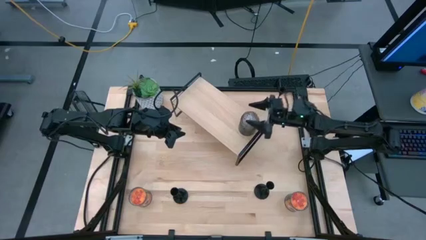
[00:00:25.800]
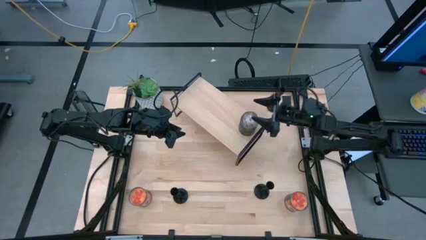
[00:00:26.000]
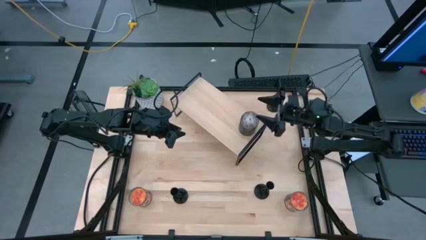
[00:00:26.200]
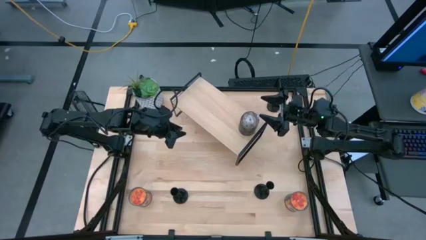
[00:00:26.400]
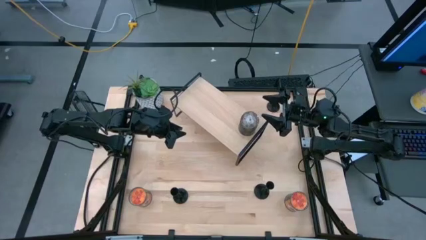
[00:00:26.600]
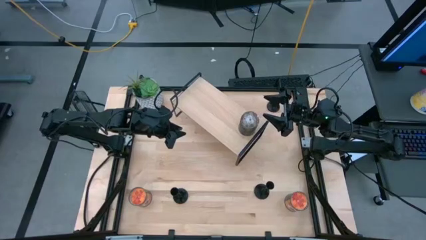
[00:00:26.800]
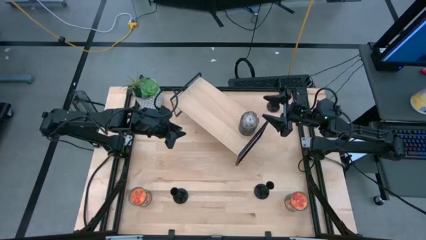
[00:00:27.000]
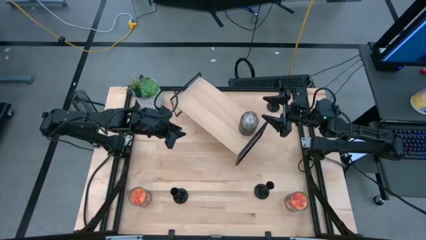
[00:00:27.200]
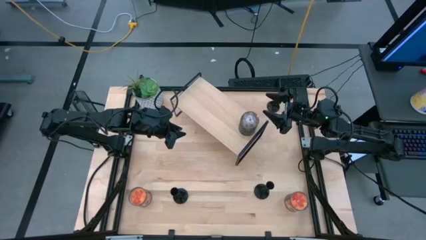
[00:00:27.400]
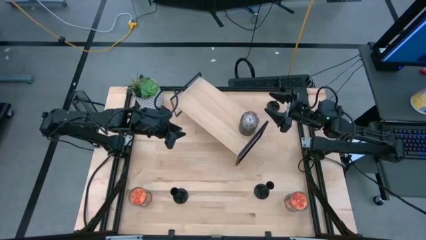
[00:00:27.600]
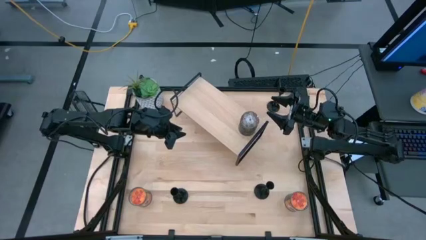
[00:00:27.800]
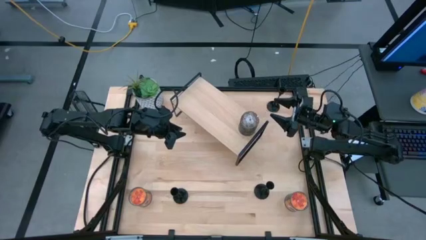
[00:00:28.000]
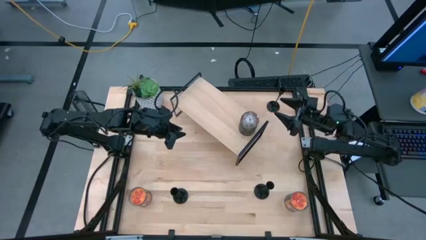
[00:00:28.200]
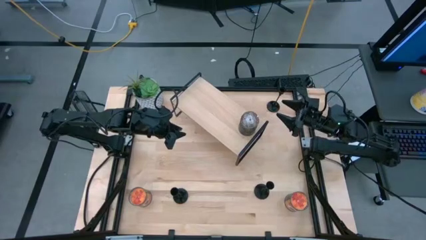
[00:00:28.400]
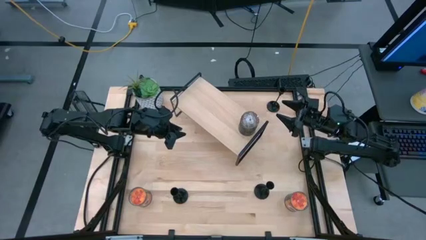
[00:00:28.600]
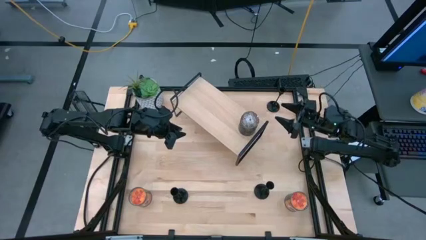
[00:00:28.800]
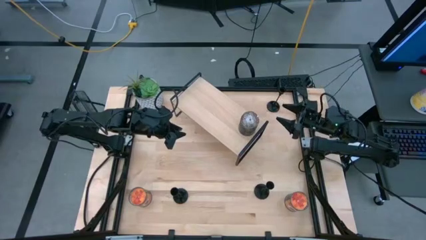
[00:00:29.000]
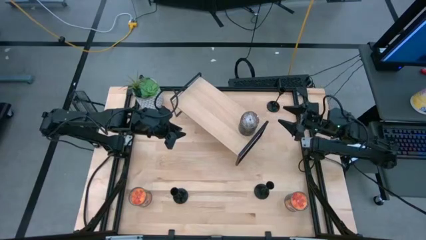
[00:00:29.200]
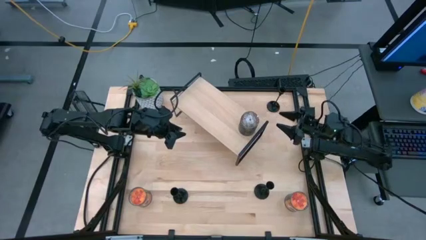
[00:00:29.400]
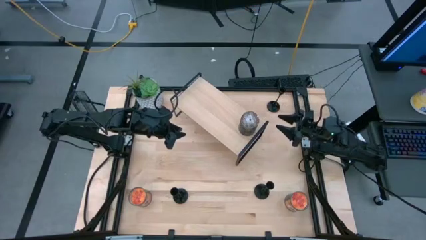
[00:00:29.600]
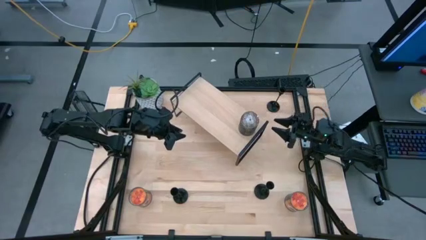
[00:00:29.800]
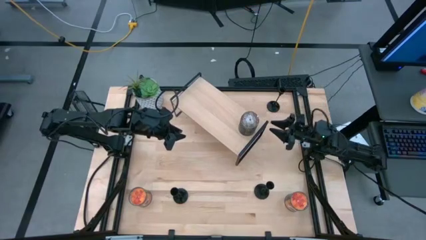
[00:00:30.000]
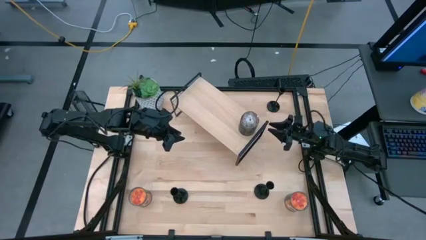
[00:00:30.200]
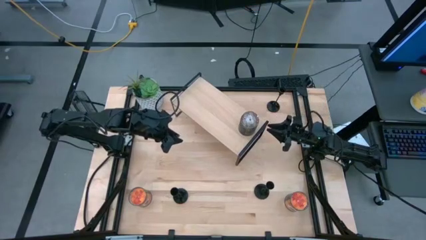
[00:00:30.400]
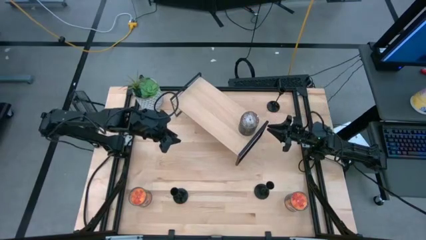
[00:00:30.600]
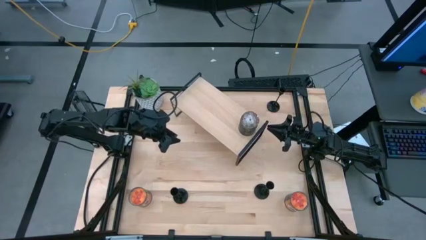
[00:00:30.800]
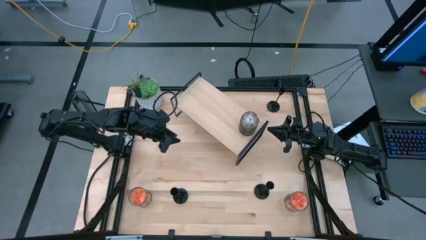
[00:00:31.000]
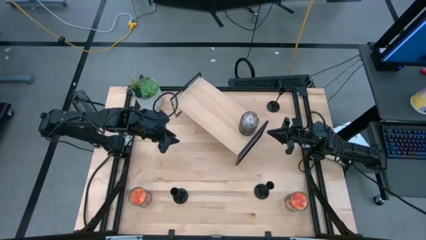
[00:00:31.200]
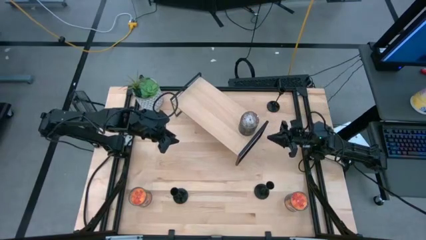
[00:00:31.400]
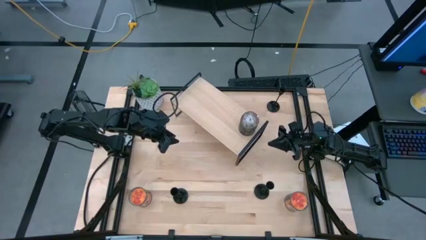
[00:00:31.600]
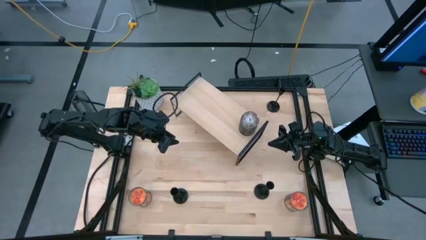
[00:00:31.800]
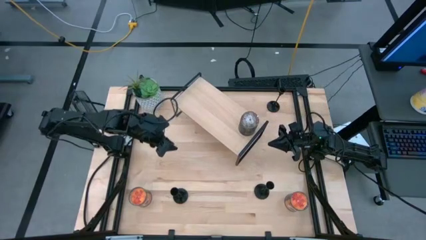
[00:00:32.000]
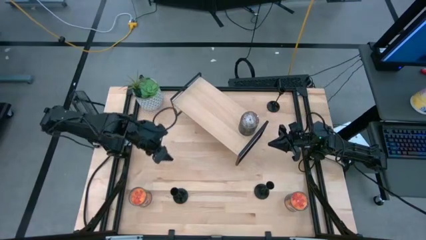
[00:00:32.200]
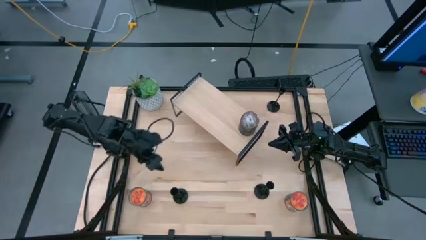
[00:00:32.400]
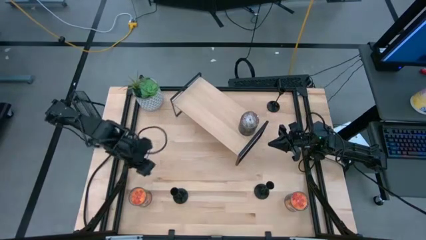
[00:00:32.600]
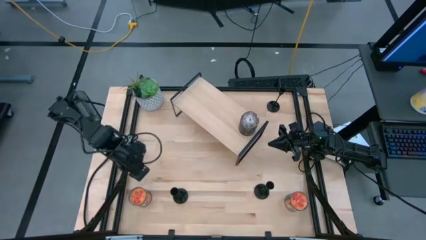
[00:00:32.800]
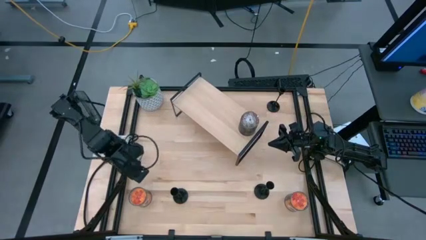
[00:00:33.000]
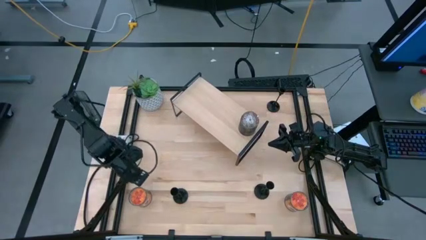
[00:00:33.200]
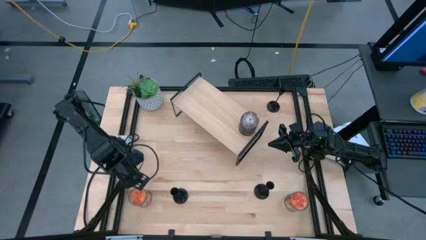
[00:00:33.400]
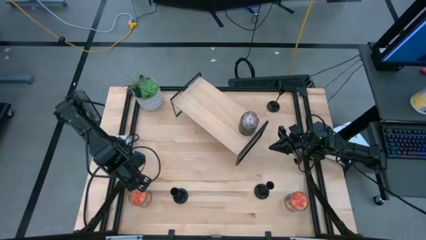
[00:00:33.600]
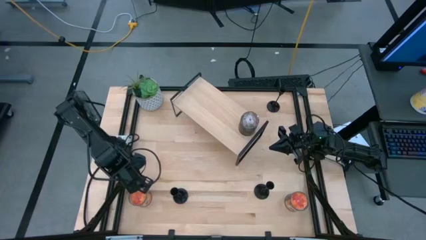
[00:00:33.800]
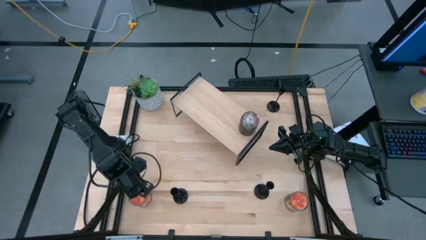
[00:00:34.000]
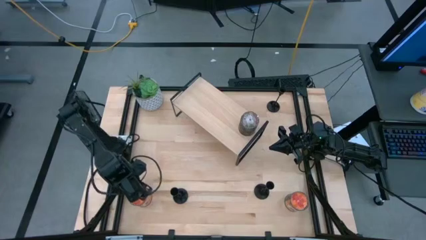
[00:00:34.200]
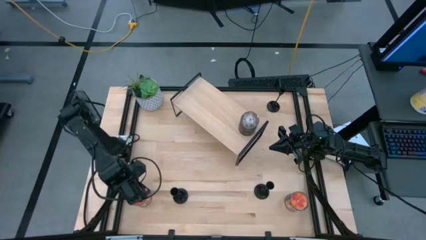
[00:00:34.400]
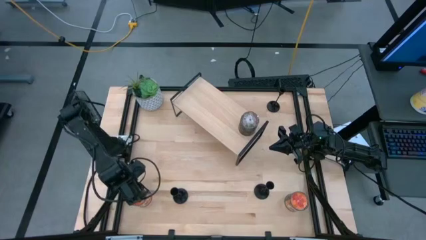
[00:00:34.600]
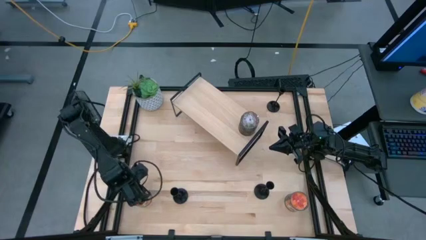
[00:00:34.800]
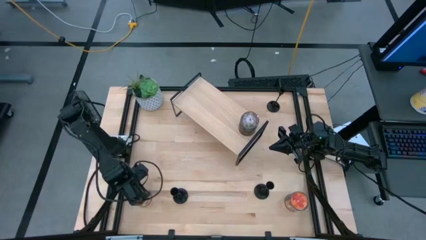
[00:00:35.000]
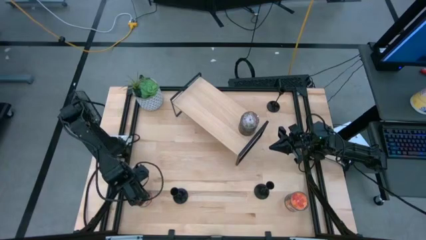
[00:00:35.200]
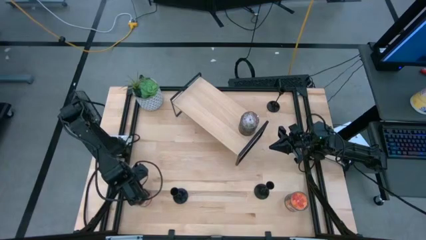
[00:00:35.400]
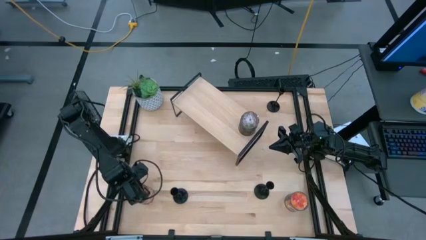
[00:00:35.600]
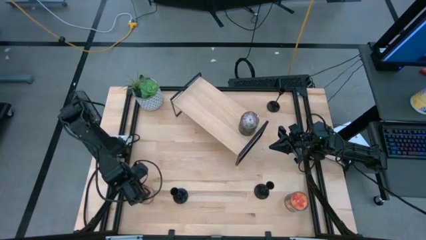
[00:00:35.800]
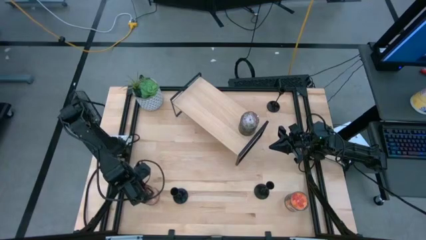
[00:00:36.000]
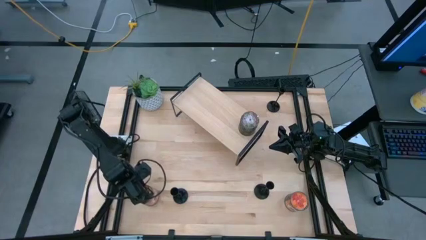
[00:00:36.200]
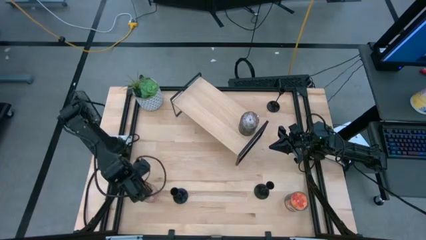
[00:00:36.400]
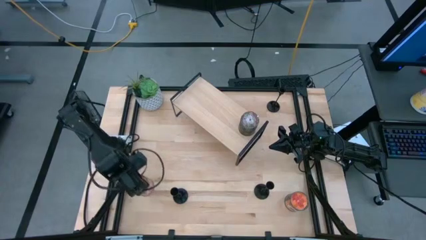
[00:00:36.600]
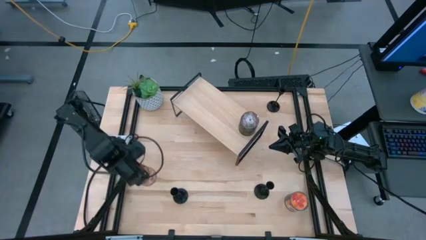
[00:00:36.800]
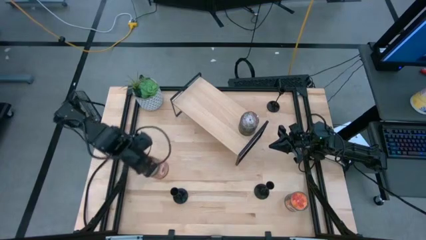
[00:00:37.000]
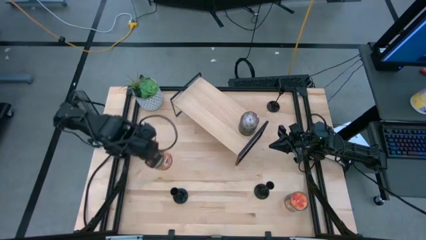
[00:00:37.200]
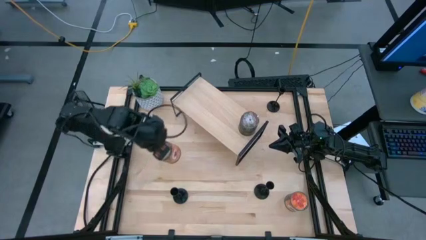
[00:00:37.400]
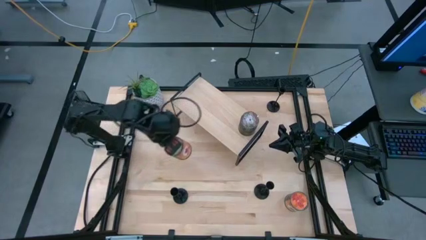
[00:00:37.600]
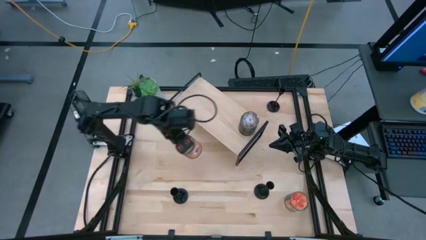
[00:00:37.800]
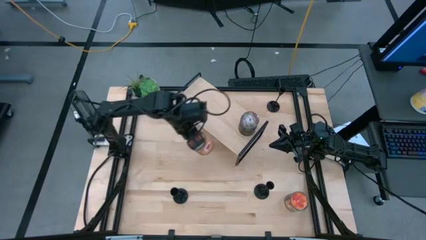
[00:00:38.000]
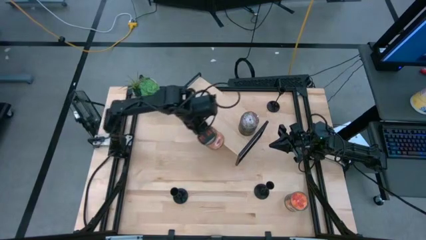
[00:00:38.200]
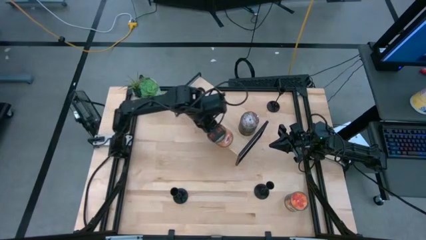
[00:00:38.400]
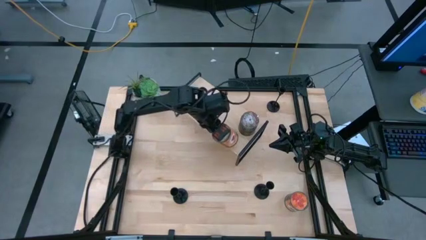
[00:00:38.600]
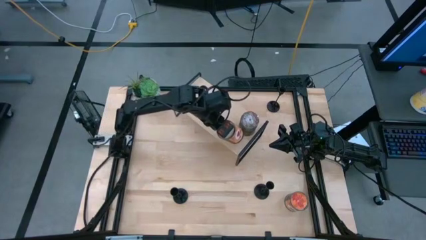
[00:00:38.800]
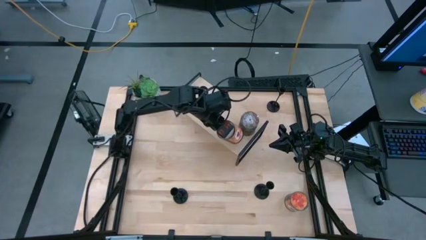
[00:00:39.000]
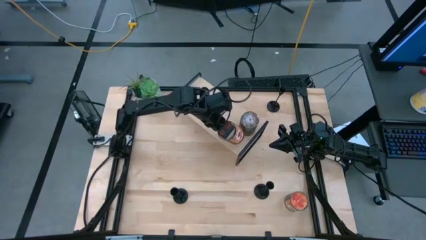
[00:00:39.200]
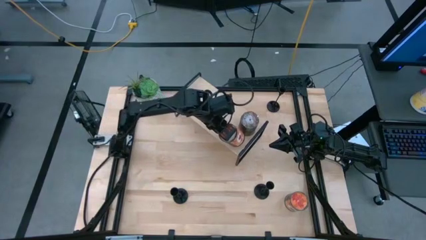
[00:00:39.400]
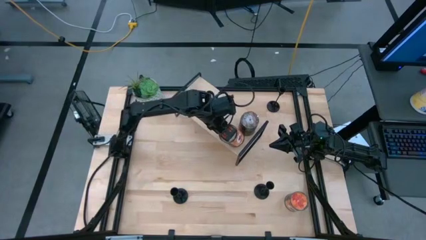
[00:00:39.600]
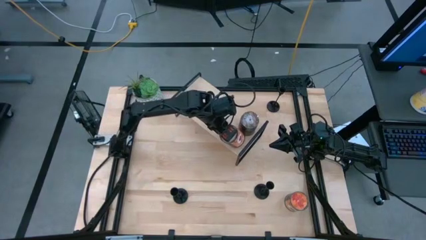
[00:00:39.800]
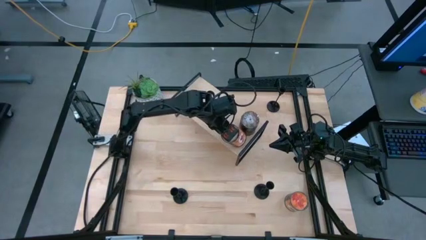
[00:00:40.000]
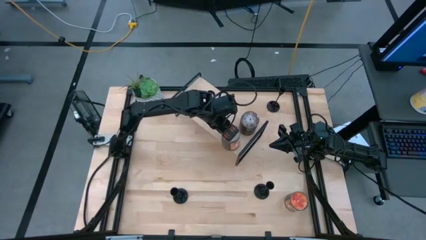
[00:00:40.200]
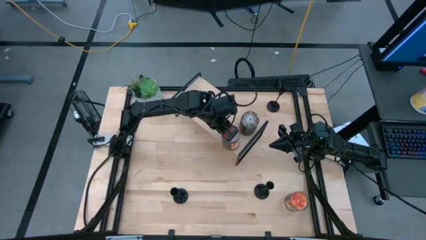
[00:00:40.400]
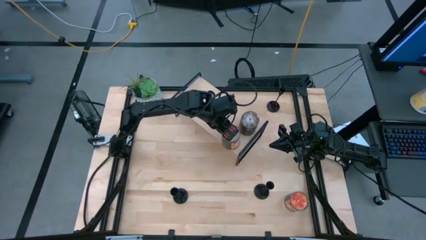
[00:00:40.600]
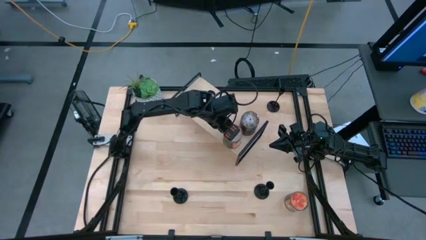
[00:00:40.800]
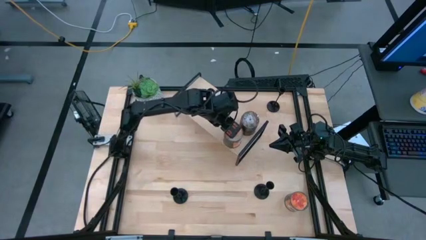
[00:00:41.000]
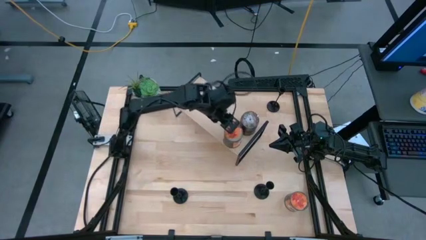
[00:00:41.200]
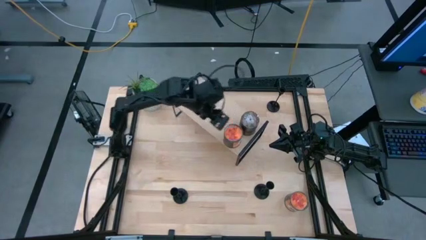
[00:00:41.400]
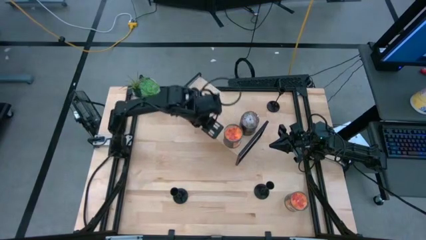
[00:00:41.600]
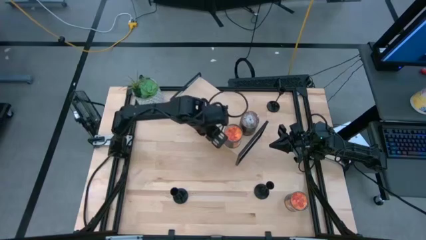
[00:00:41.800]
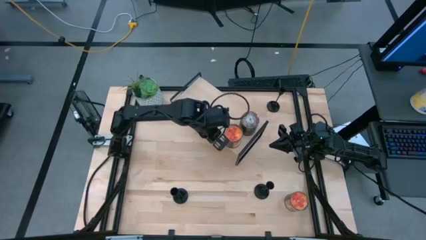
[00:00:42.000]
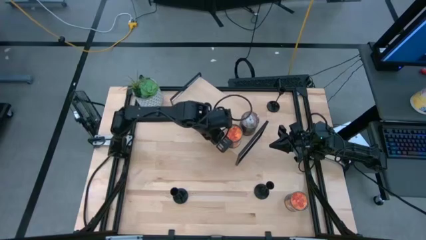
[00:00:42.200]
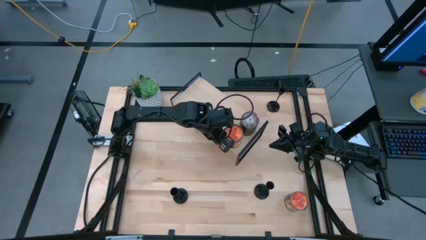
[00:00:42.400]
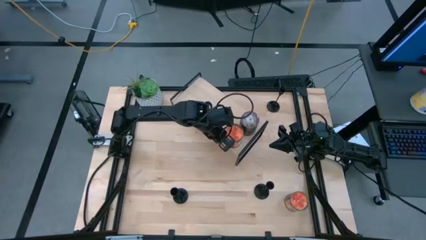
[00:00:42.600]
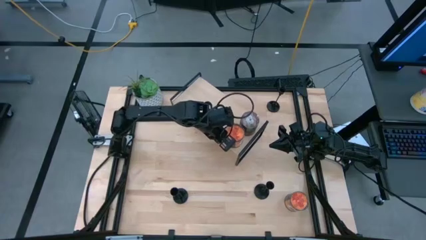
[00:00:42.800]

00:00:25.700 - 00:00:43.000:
Task: Pick & Place candle stick holders
Put the left orange scented candle on the shelf
